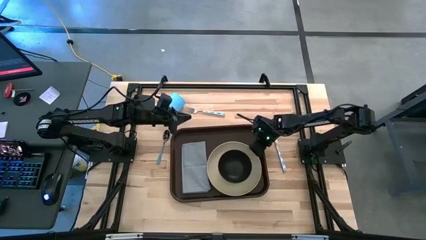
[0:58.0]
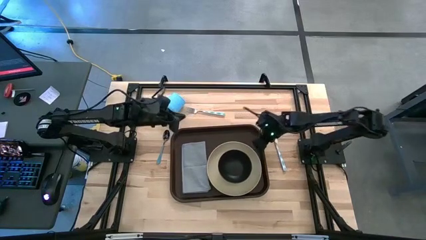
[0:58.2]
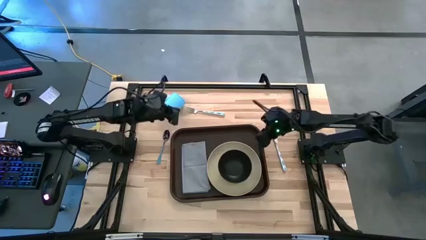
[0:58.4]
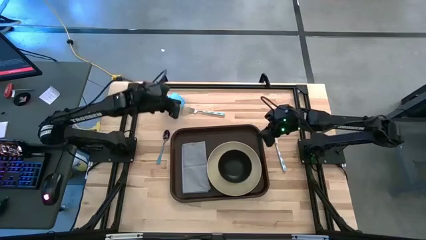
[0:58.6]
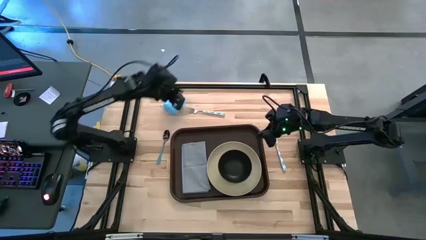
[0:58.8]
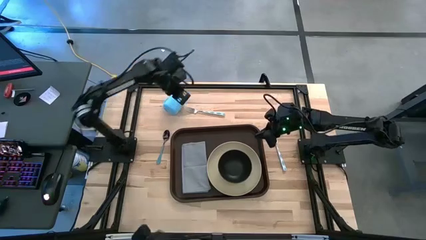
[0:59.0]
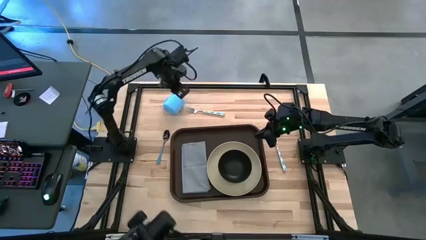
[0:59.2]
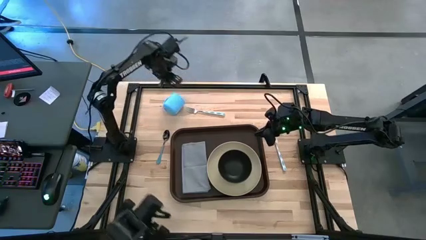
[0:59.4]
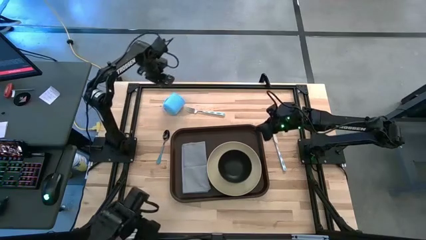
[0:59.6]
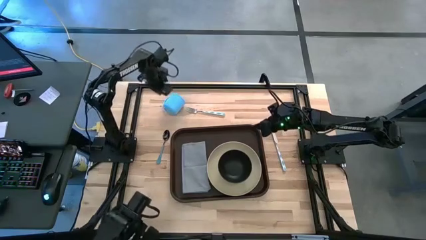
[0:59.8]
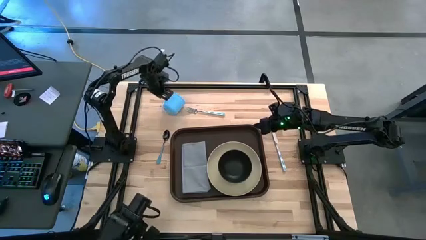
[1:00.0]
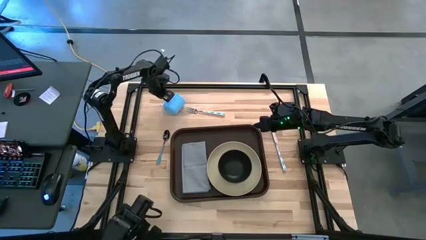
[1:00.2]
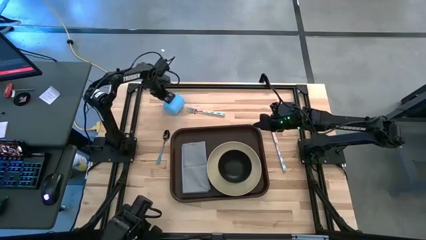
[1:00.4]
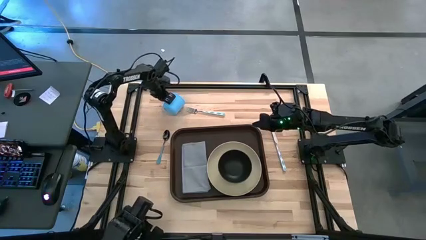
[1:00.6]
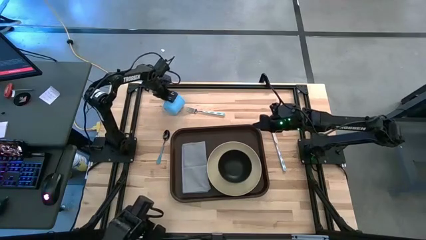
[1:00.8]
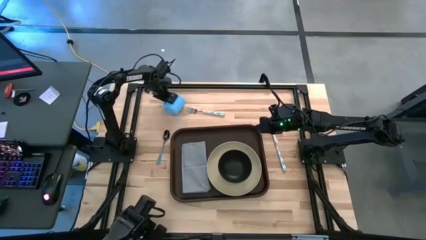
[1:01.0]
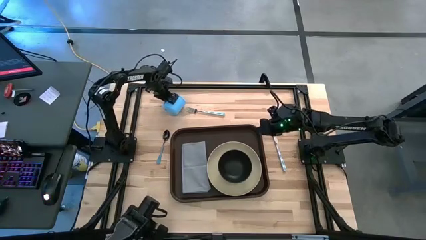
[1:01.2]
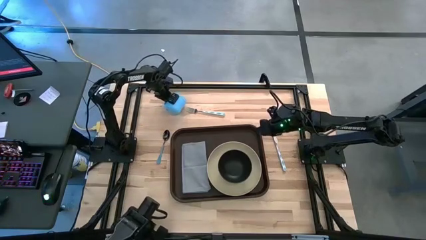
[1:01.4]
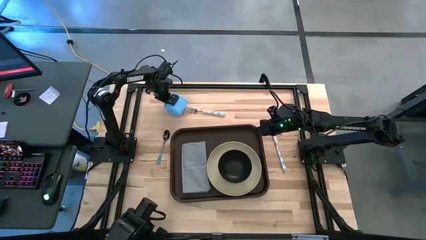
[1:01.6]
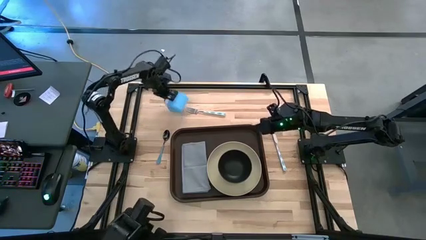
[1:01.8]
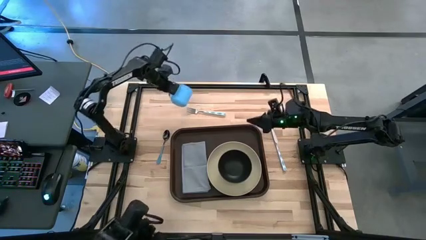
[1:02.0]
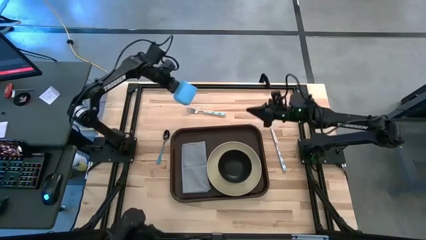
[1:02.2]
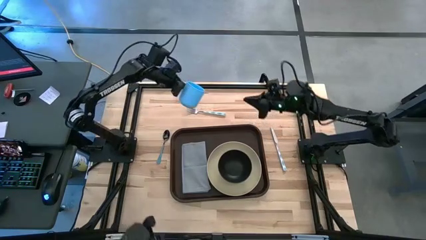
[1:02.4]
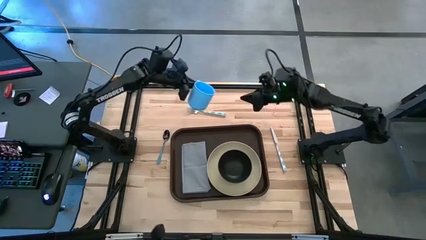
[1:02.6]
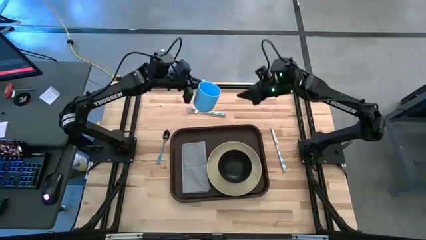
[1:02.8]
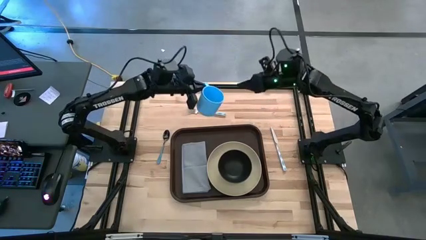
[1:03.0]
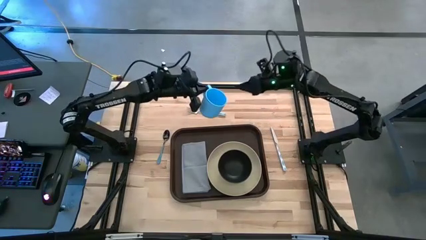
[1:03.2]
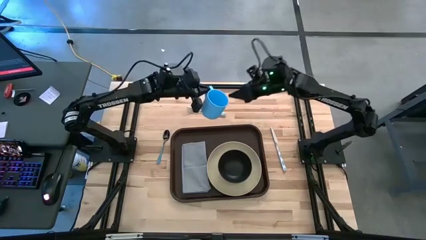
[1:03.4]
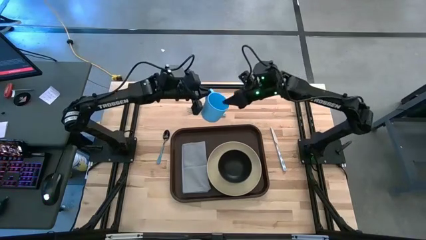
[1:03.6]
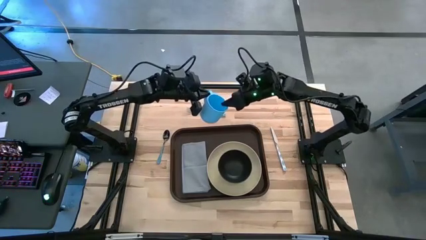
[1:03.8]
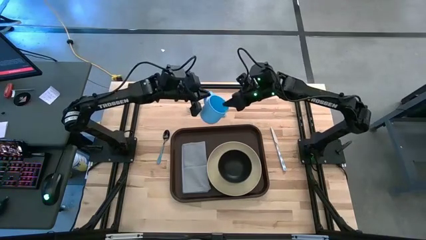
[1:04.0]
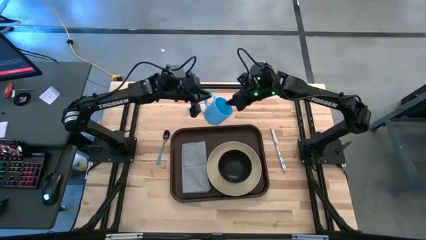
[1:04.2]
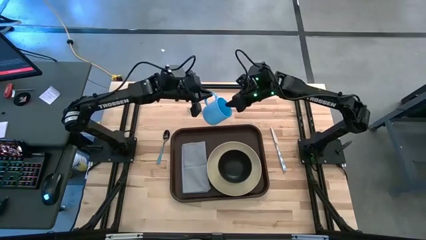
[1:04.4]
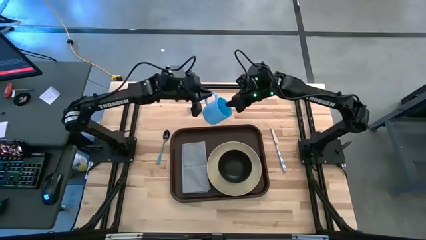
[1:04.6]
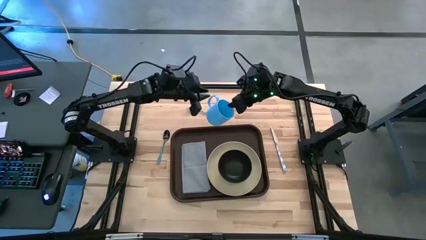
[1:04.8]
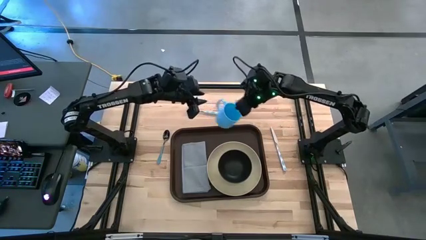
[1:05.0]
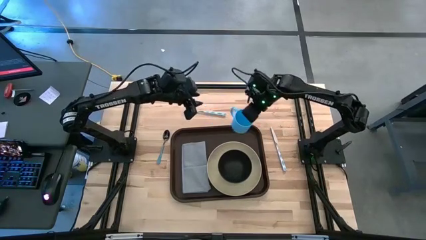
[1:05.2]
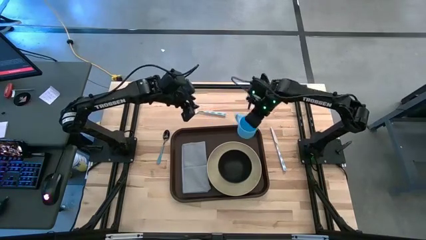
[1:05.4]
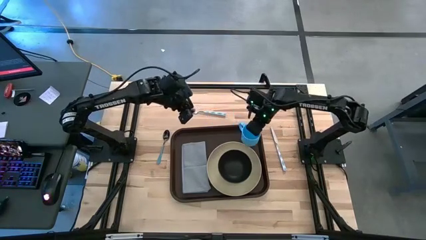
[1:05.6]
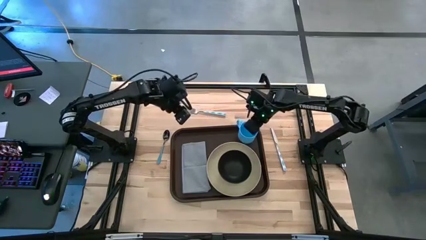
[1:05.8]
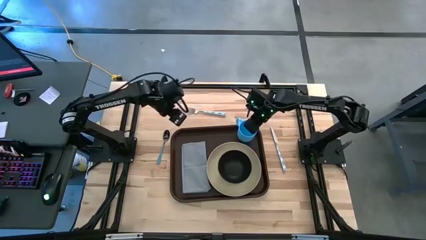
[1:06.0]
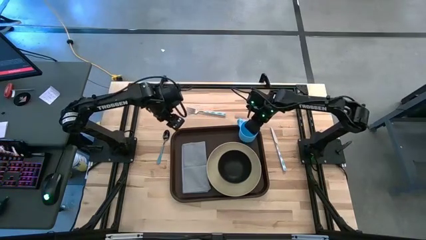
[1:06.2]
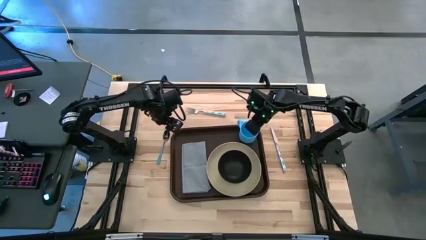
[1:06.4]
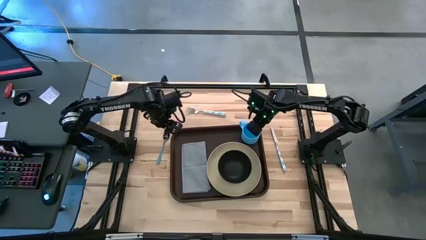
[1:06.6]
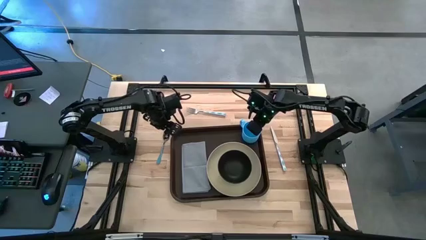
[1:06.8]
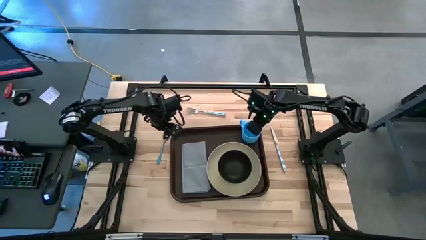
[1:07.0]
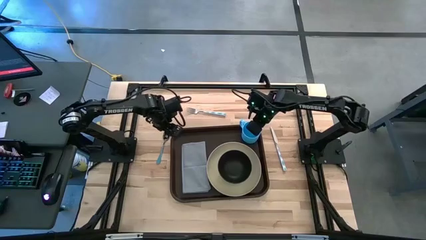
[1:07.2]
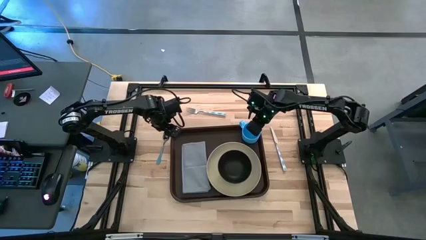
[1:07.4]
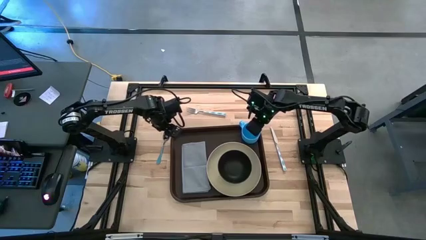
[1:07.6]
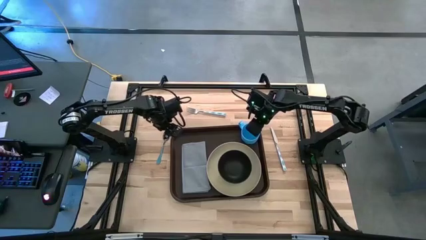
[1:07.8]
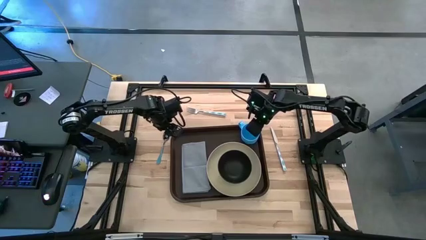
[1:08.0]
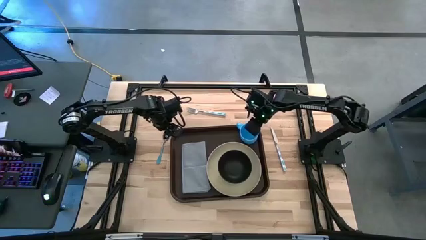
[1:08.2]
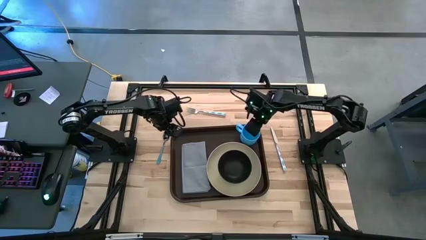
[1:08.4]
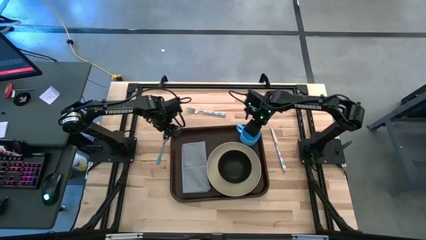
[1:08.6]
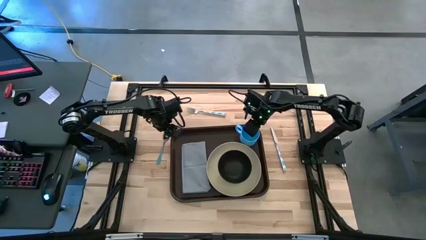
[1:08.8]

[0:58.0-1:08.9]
Task: Set up tray
Put the blue mug on the dark brown serving tray to the top right of the brown plate

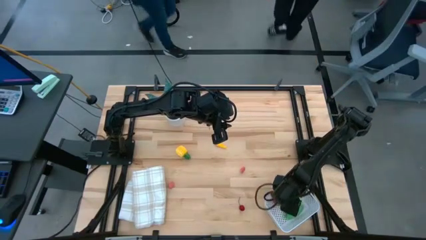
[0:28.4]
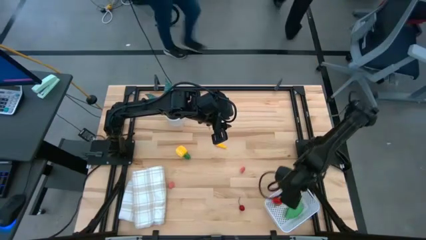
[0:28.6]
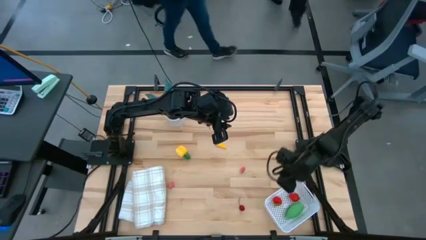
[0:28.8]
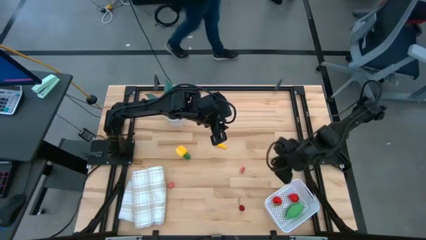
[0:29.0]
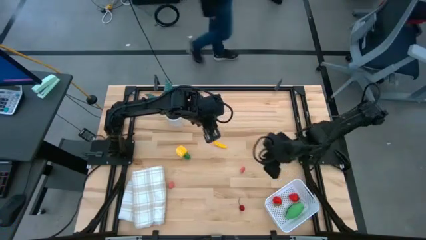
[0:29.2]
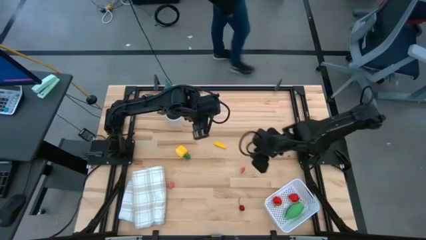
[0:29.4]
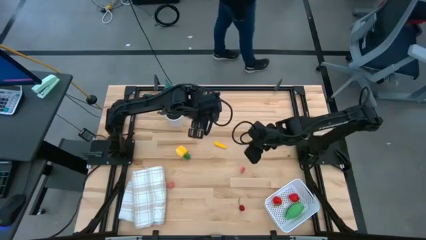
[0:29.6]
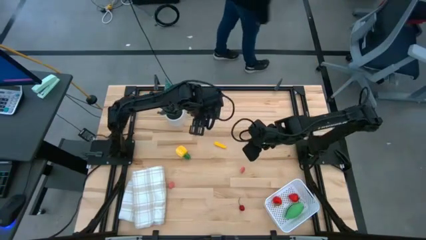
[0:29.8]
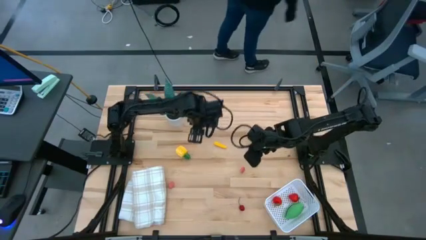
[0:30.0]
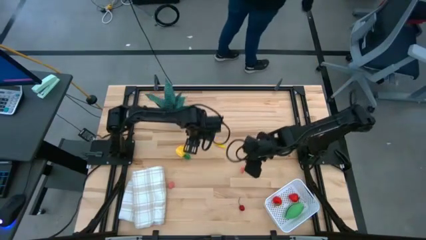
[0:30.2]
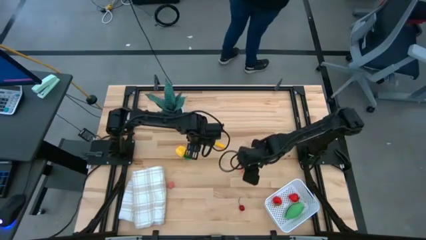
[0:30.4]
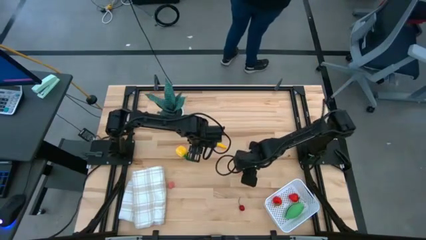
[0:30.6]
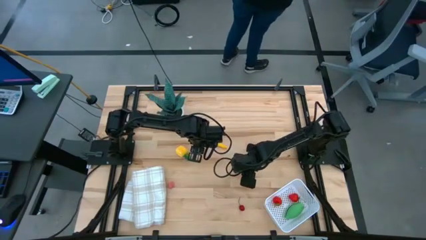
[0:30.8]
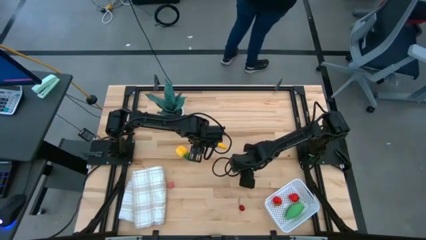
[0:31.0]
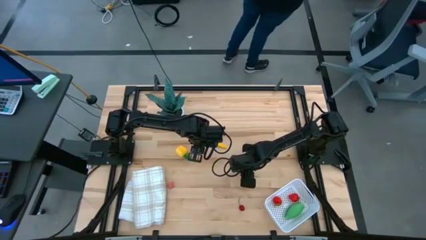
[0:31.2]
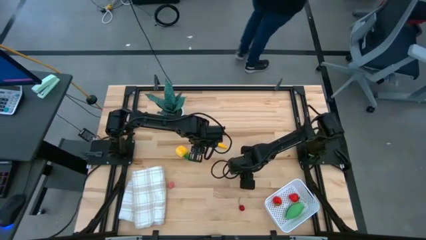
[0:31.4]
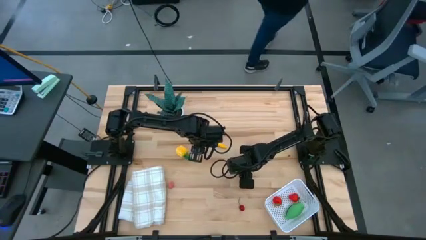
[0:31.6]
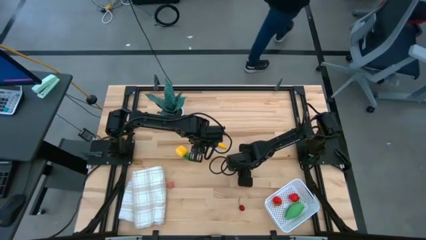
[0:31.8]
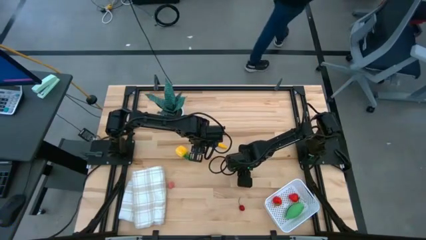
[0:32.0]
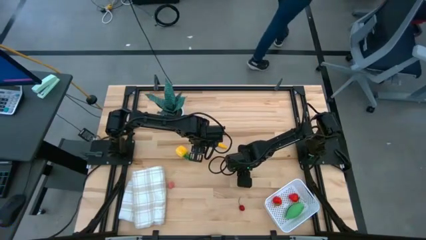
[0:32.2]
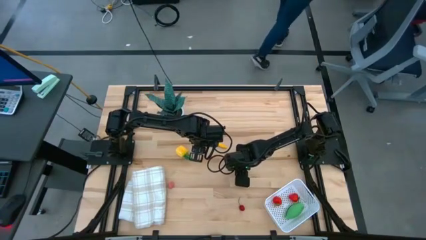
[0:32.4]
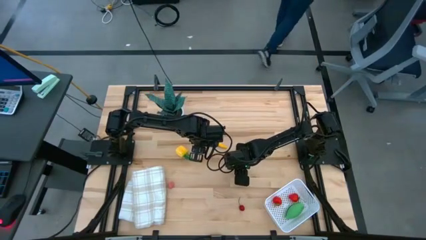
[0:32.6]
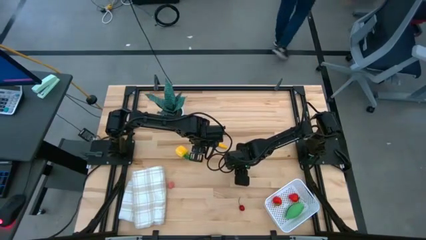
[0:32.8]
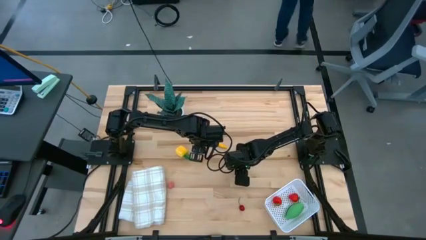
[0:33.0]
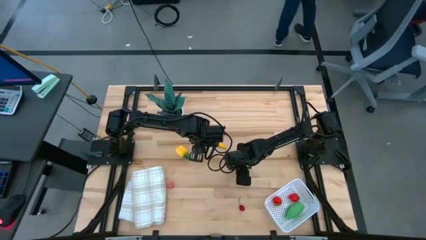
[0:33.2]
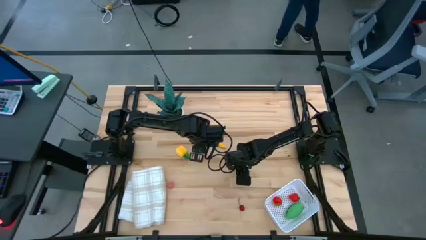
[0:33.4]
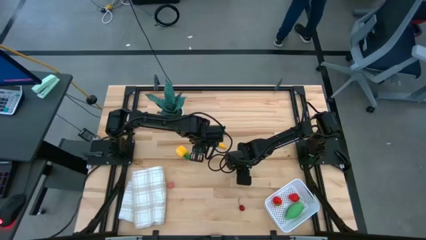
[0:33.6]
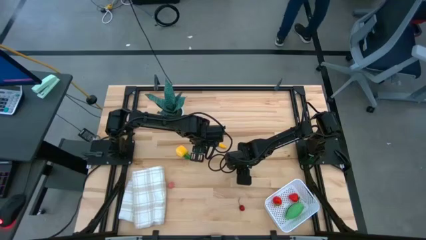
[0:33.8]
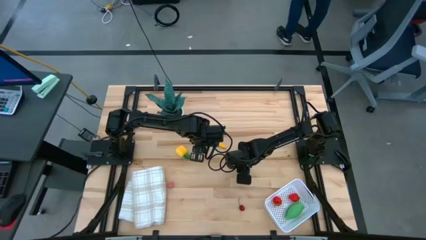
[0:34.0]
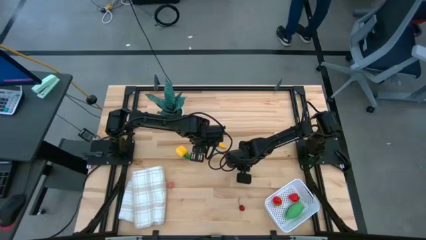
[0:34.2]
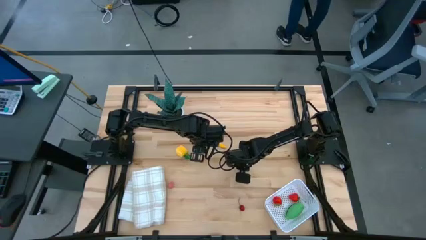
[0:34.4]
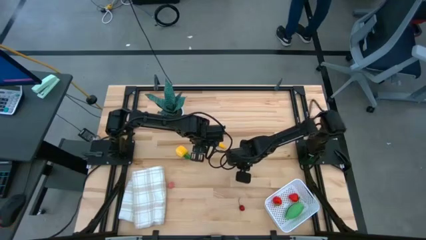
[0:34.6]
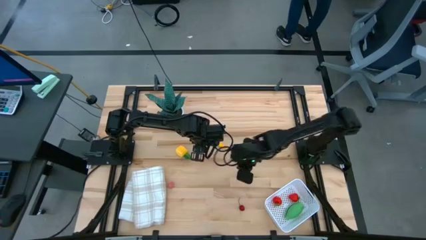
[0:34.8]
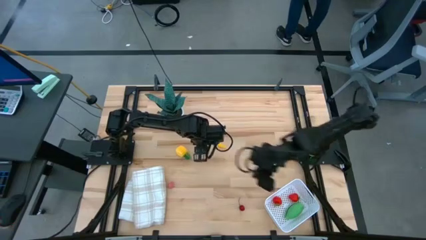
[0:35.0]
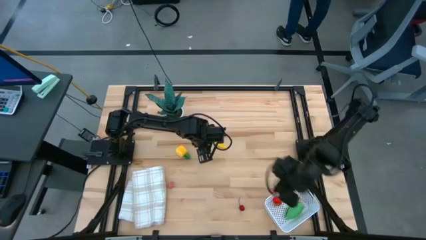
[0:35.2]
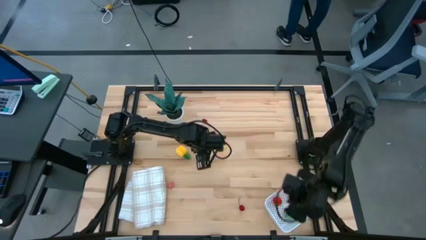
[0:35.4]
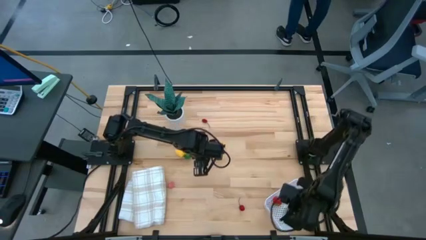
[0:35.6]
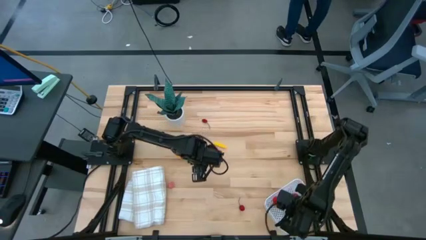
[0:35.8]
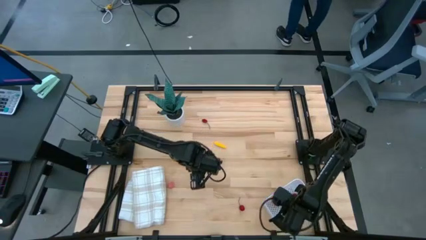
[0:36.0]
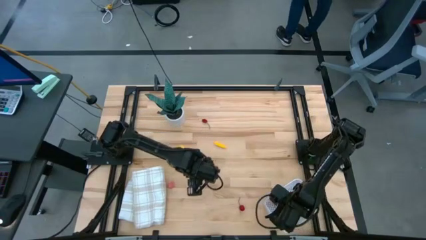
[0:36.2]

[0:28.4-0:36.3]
Task: Pick and placing Produce into tupperware
Put the right pink peach into the white basket
